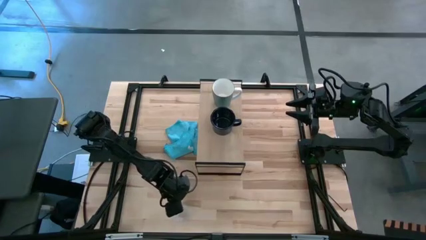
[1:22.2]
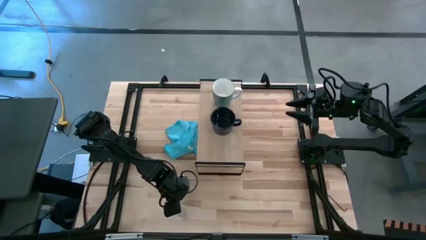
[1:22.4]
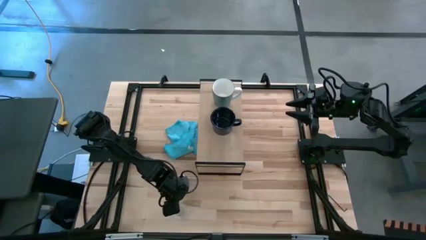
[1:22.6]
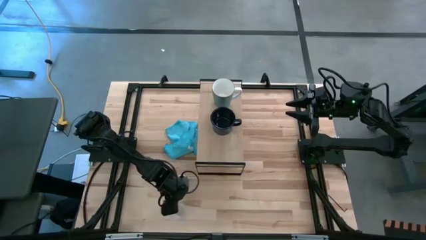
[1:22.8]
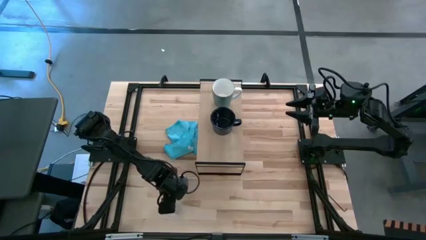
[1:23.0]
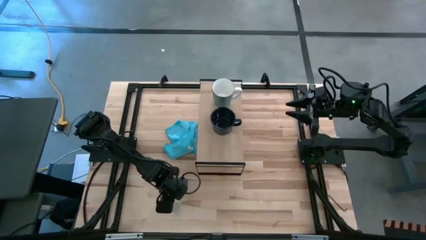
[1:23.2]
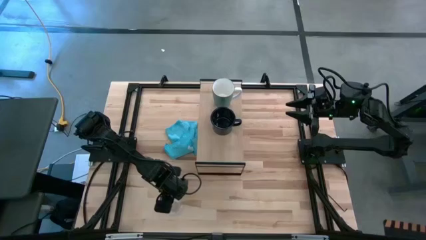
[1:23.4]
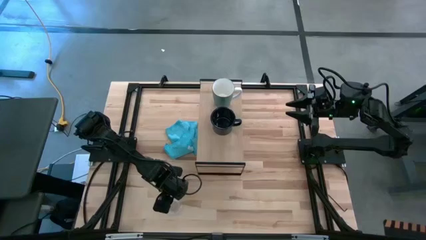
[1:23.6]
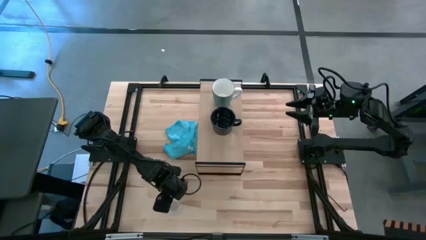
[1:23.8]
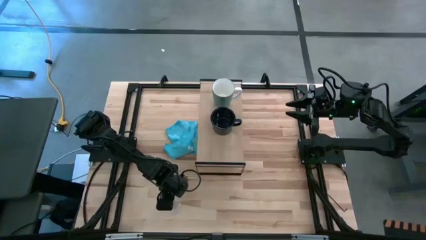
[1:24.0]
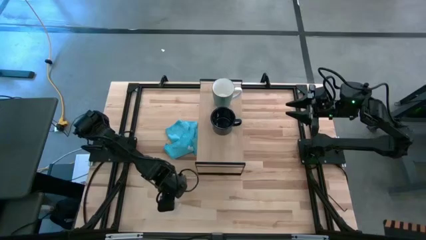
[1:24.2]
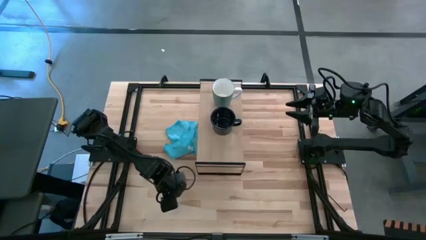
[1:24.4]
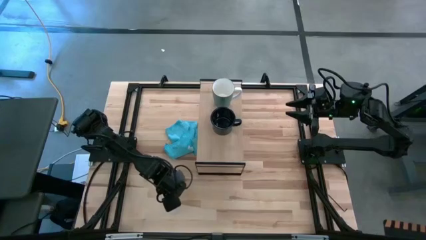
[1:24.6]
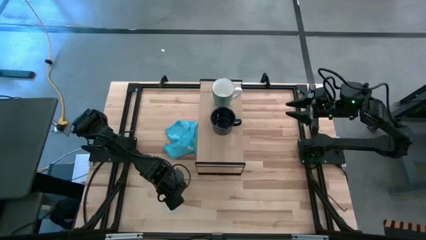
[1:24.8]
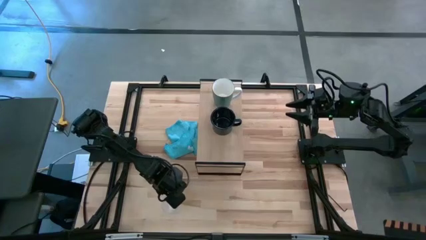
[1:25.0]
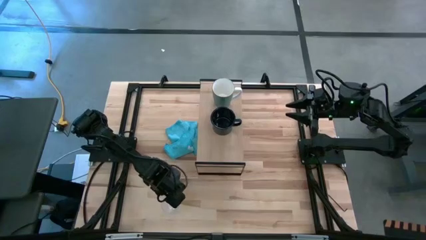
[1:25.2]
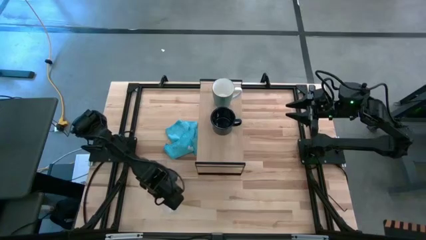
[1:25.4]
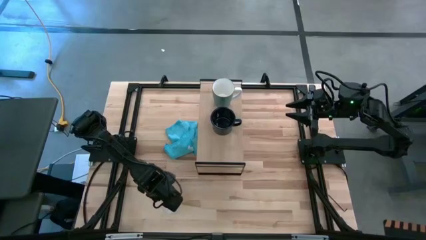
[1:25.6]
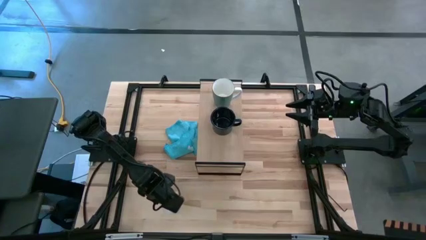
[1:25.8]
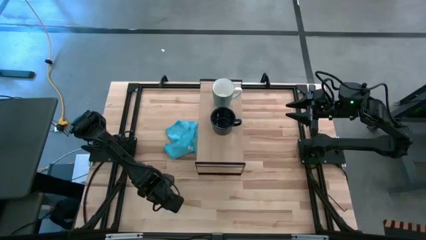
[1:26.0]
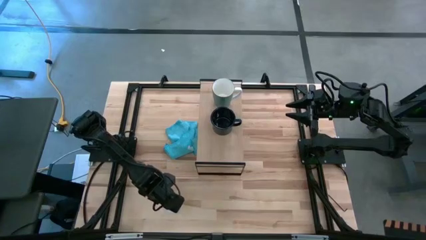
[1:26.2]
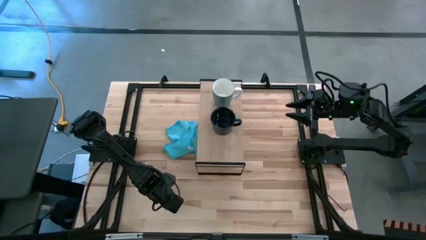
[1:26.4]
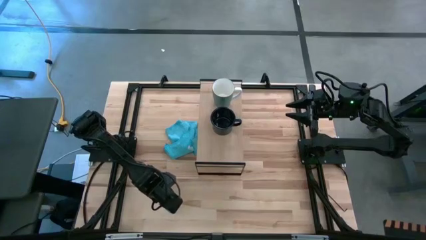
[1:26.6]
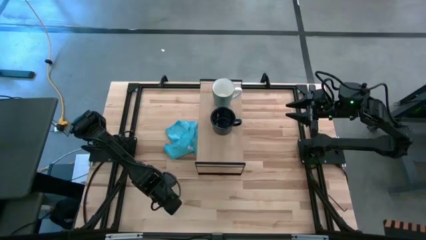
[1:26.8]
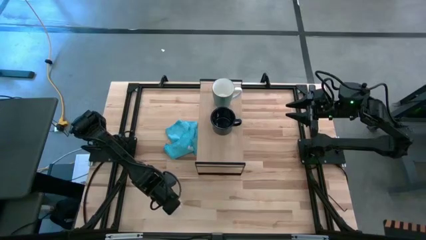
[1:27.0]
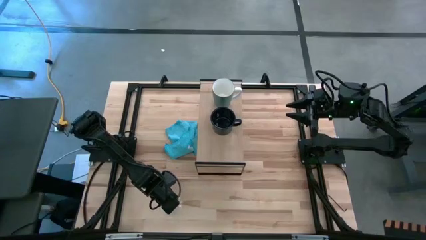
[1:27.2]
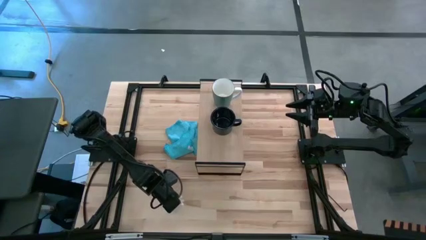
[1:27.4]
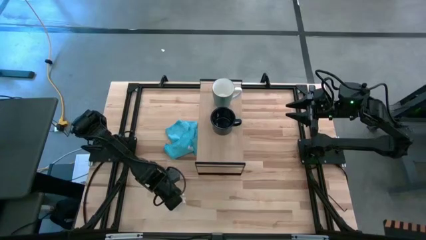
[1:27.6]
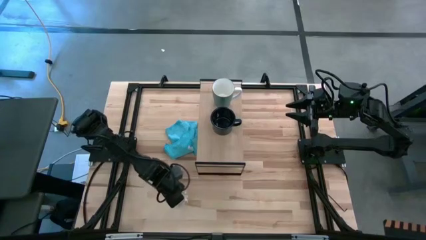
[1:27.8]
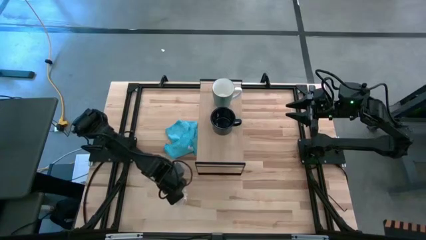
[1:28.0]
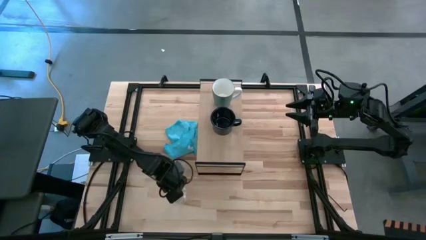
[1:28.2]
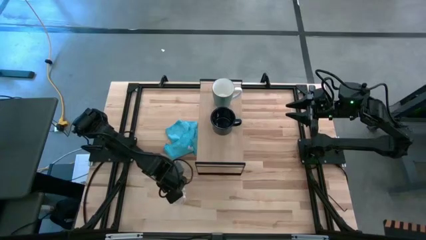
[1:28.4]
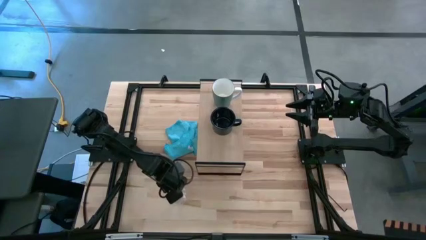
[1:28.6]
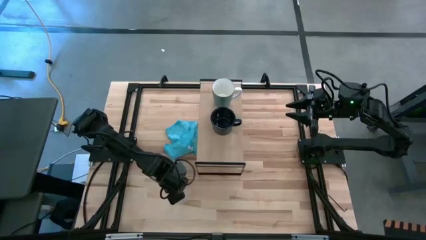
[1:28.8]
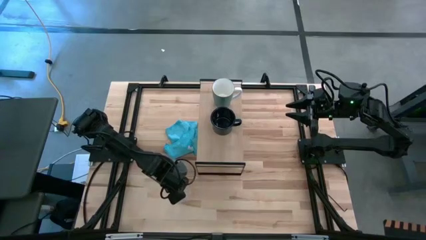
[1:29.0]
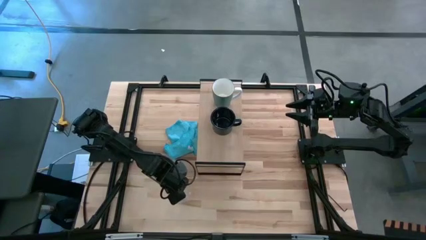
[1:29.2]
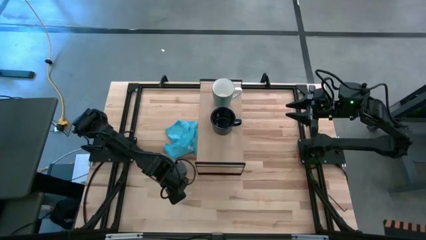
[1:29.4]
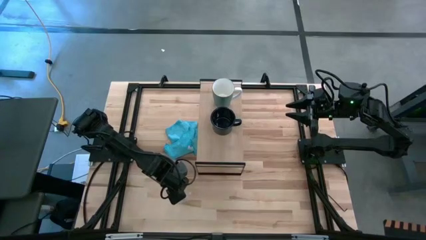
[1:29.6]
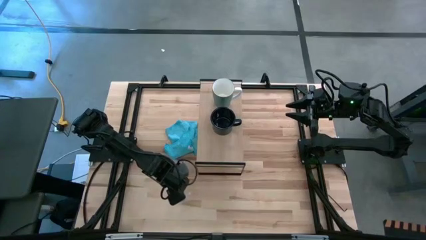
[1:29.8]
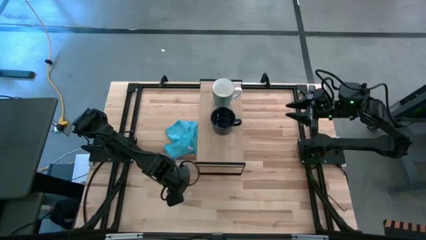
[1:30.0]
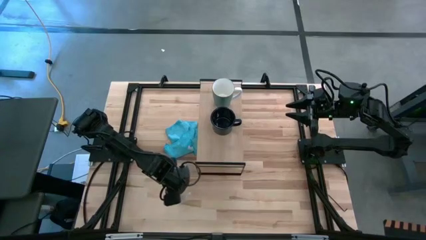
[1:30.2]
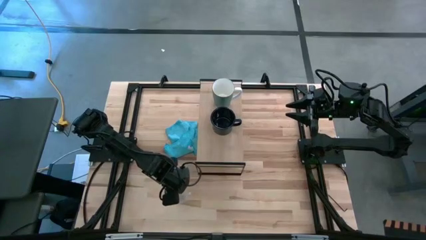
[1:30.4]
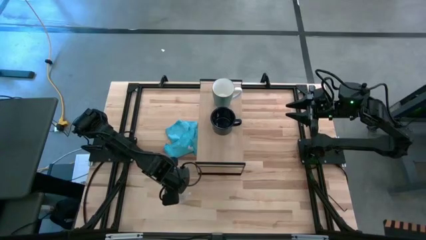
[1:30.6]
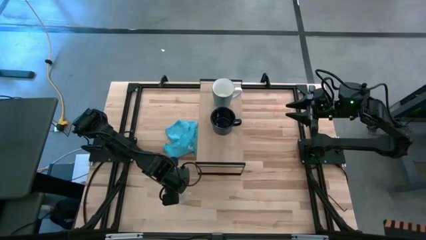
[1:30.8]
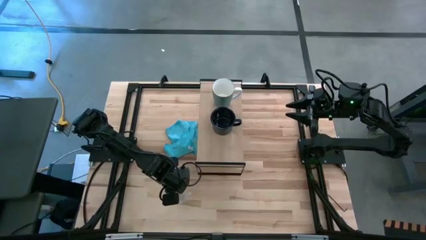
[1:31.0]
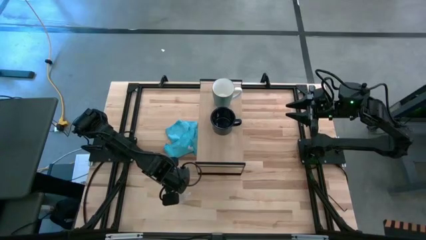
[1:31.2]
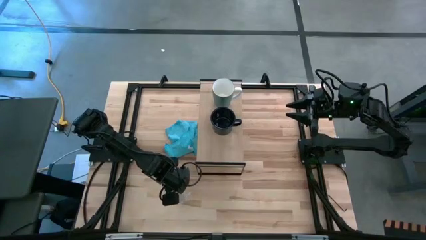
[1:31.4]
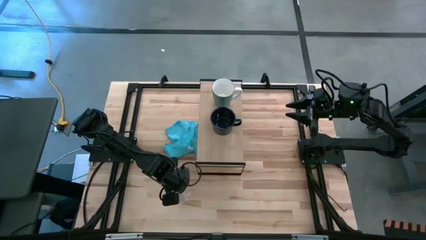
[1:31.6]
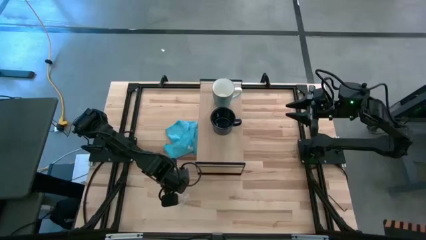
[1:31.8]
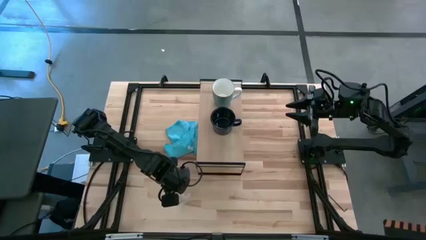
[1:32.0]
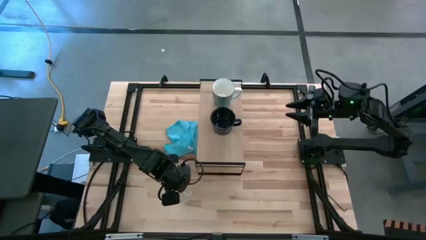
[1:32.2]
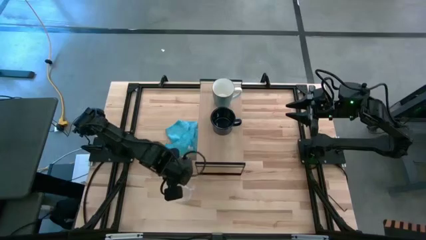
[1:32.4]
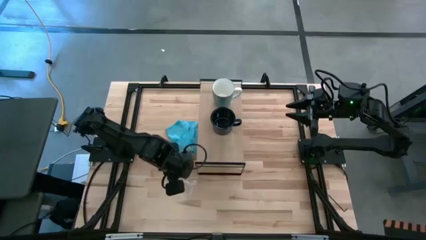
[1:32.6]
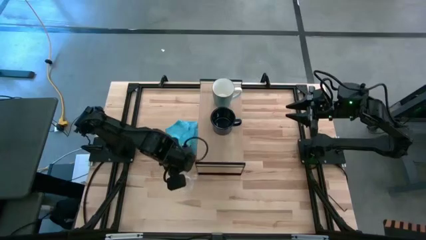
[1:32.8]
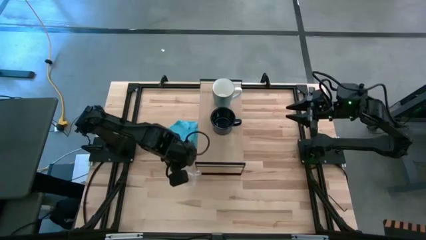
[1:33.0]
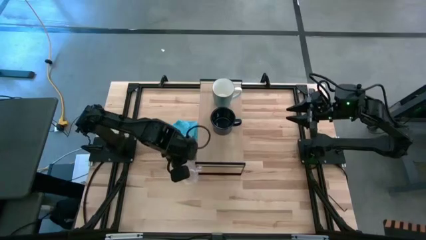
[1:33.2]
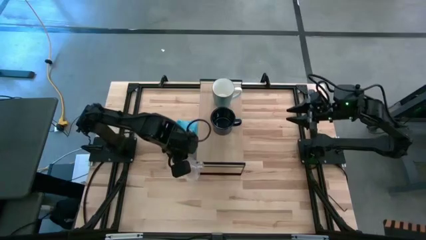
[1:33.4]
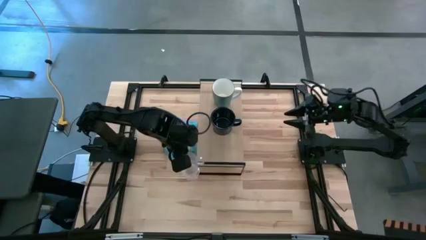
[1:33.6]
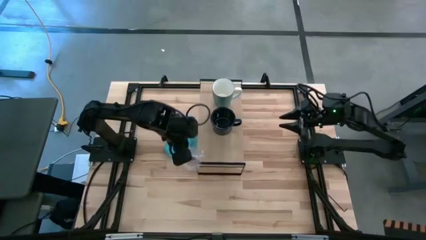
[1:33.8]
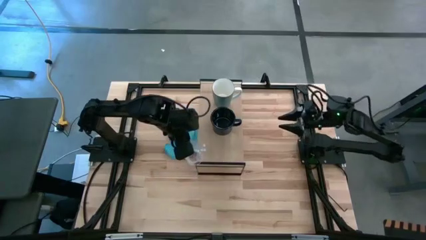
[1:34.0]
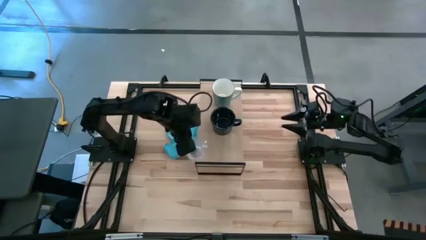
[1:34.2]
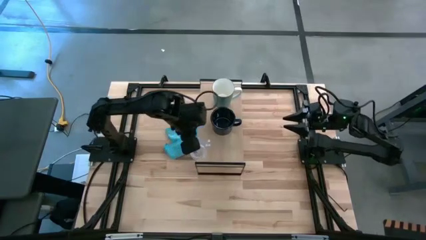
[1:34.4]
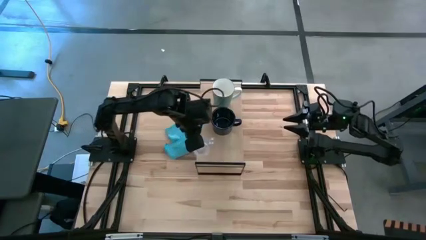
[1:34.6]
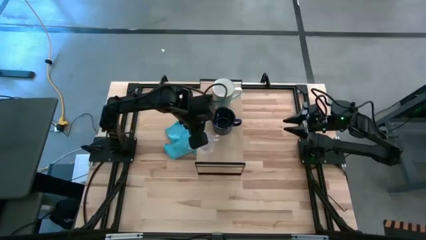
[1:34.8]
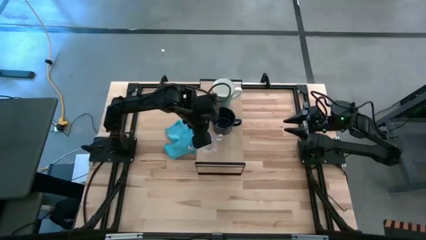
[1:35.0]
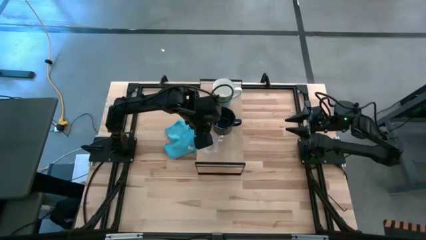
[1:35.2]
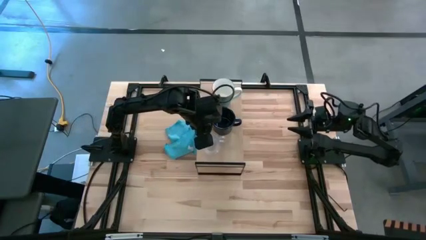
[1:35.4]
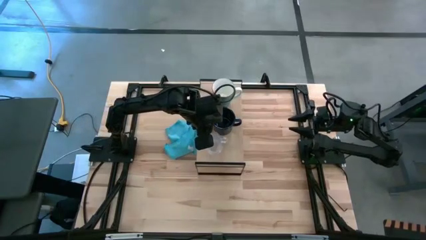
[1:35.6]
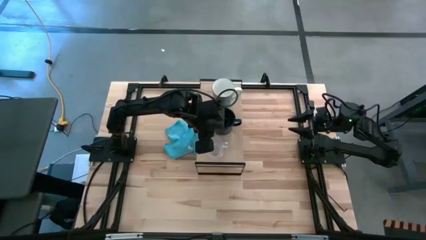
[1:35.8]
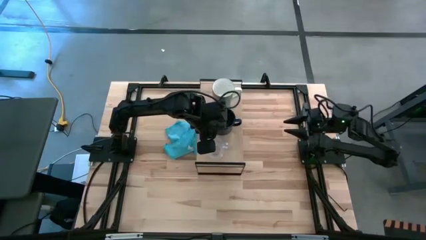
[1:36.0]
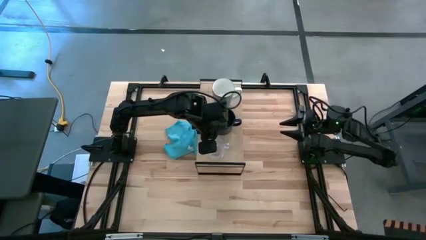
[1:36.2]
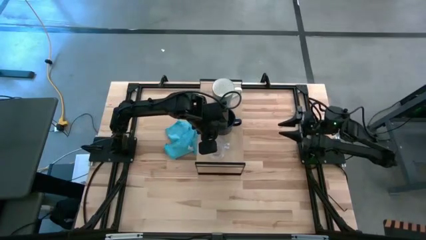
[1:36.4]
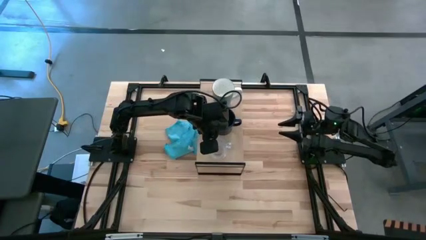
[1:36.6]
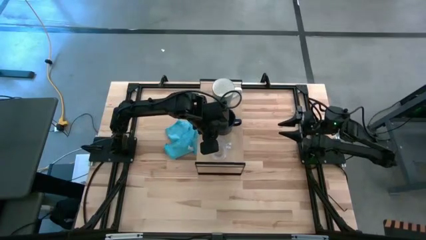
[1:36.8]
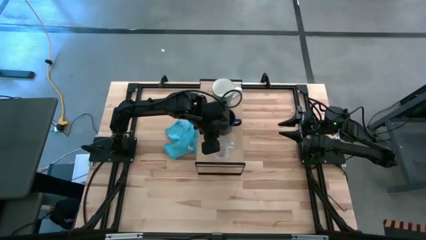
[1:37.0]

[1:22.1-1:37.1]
Task: Stack small to large cups/mugs on shelf
Put the transparent mug on the shelf
